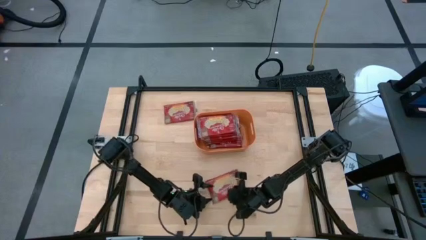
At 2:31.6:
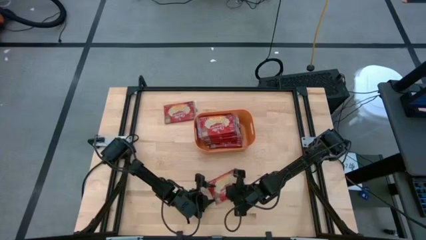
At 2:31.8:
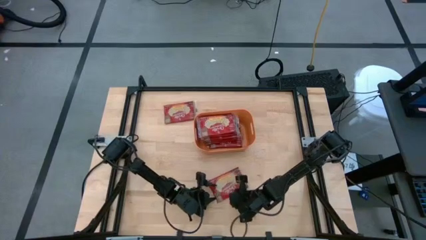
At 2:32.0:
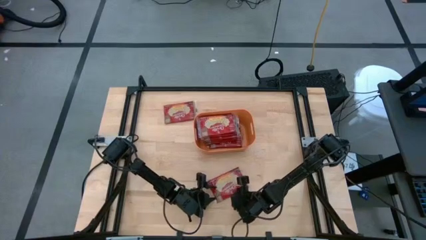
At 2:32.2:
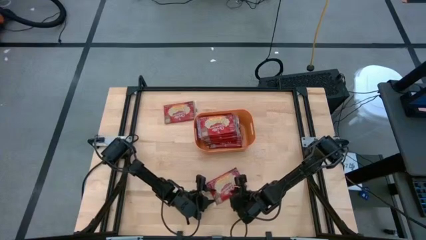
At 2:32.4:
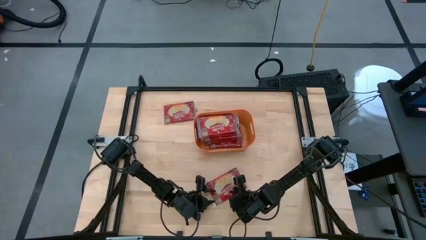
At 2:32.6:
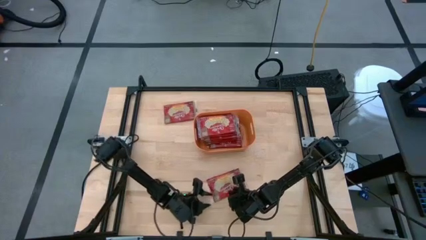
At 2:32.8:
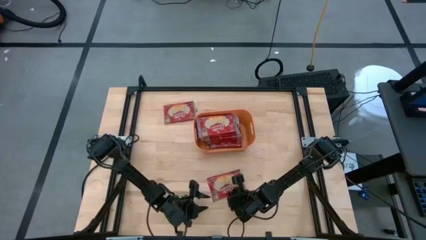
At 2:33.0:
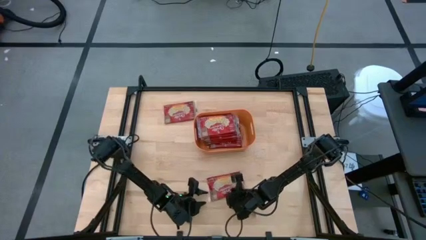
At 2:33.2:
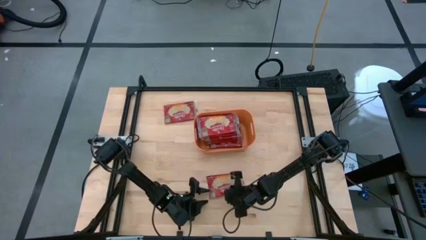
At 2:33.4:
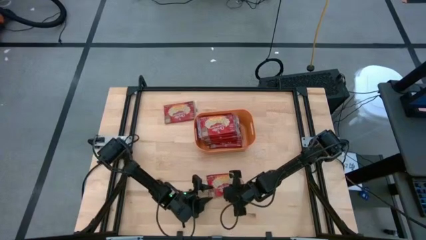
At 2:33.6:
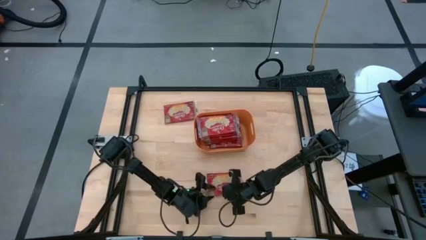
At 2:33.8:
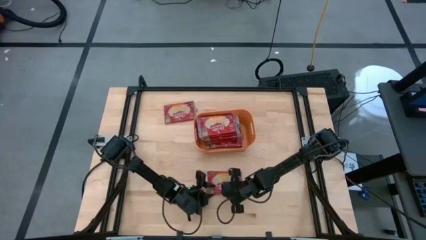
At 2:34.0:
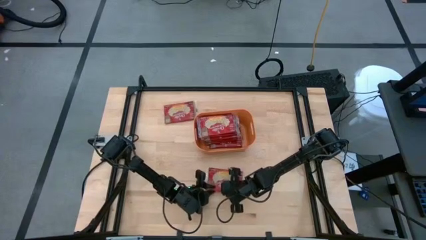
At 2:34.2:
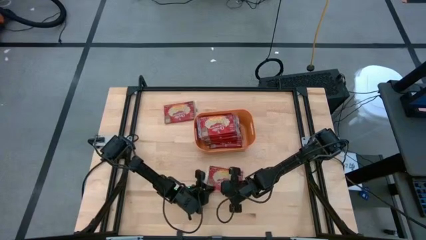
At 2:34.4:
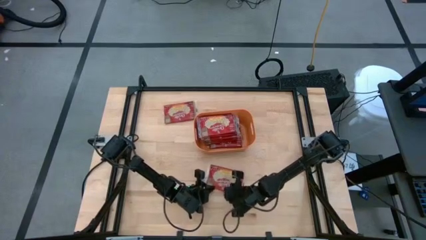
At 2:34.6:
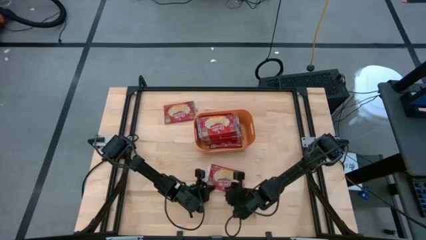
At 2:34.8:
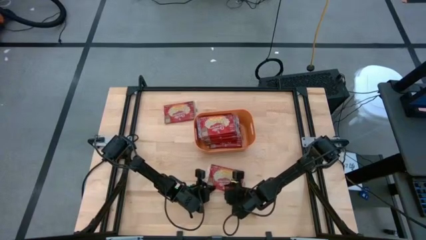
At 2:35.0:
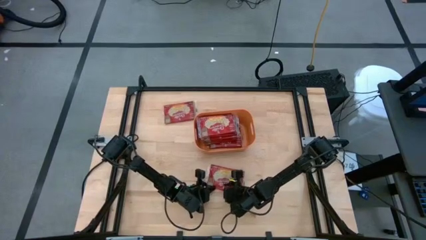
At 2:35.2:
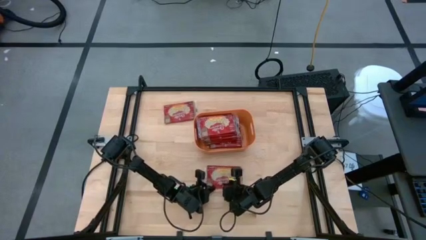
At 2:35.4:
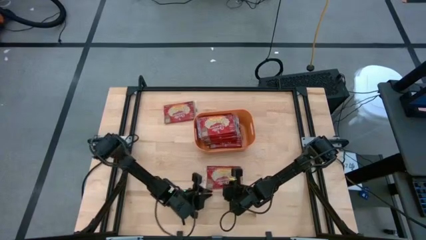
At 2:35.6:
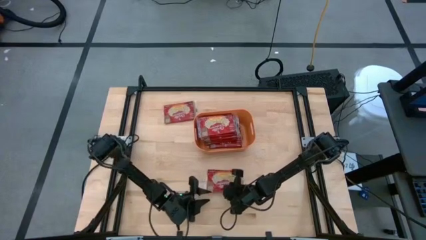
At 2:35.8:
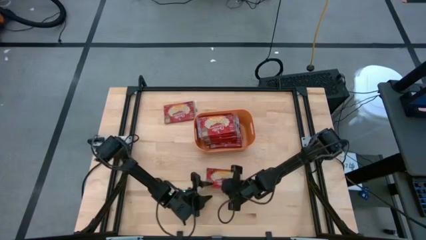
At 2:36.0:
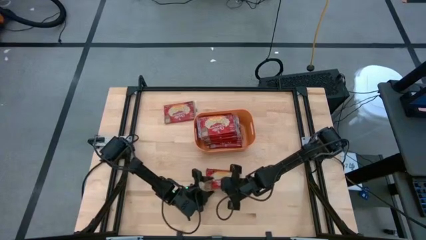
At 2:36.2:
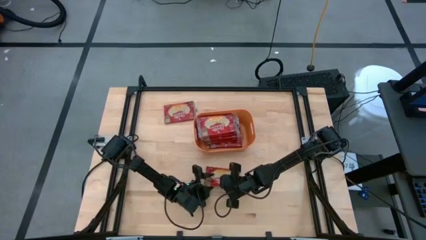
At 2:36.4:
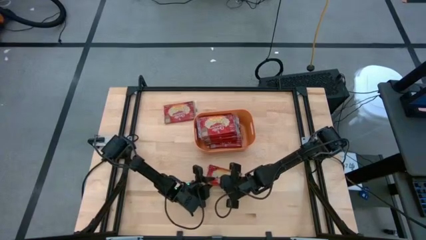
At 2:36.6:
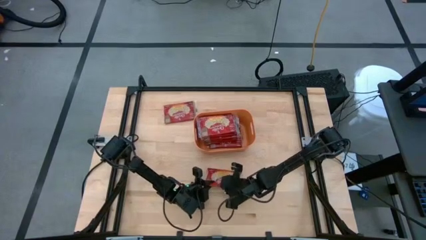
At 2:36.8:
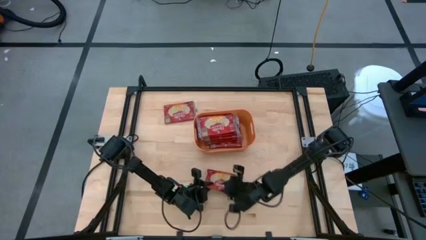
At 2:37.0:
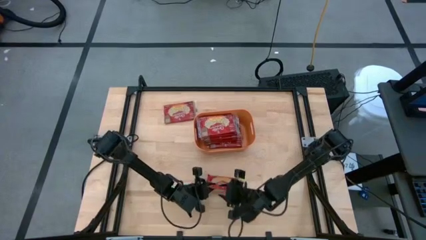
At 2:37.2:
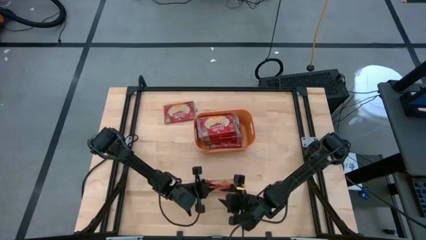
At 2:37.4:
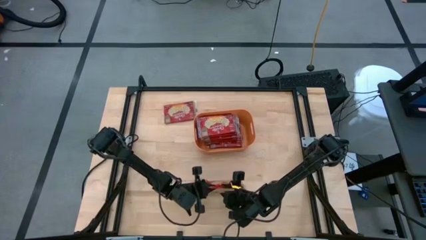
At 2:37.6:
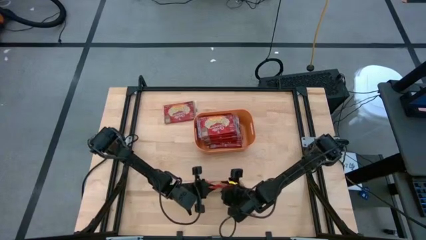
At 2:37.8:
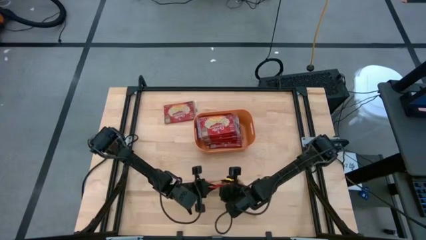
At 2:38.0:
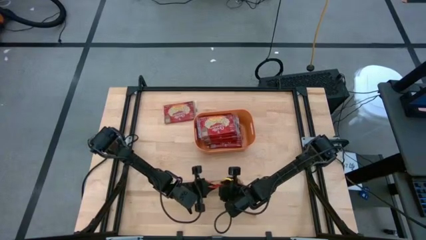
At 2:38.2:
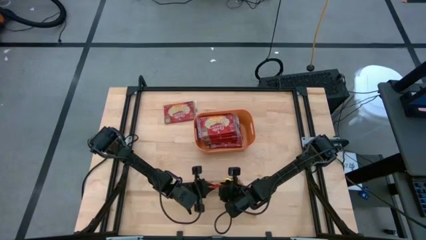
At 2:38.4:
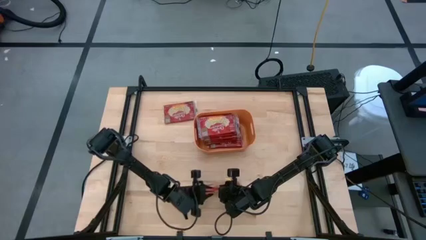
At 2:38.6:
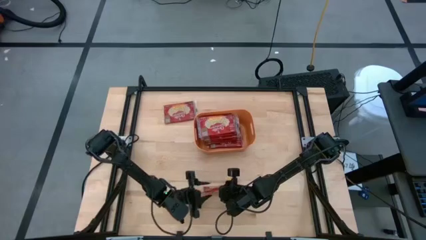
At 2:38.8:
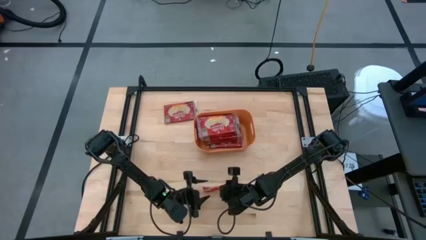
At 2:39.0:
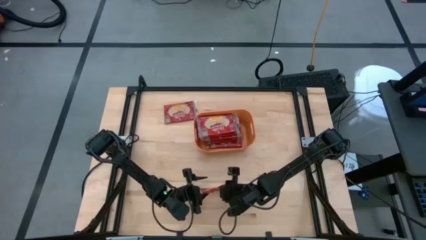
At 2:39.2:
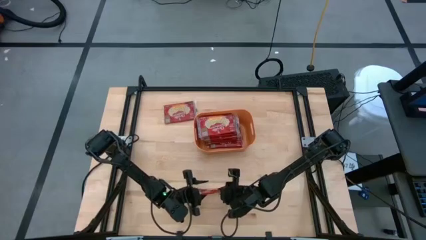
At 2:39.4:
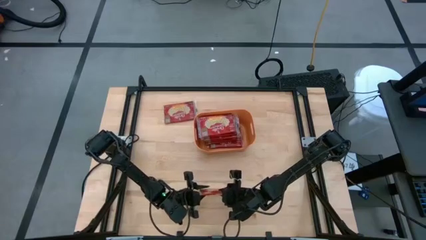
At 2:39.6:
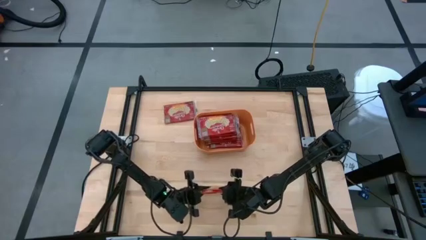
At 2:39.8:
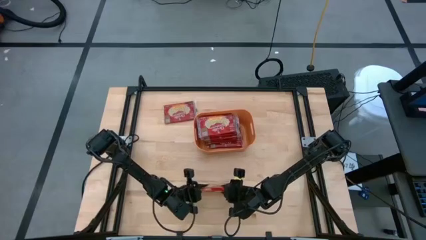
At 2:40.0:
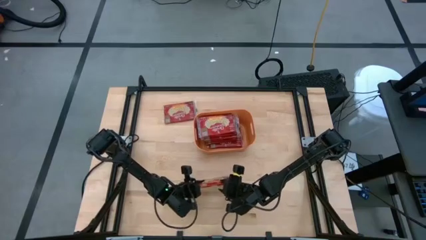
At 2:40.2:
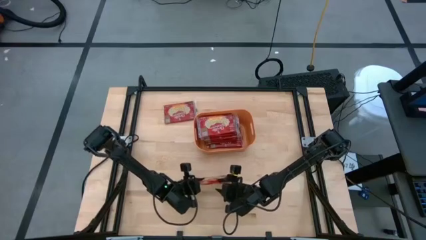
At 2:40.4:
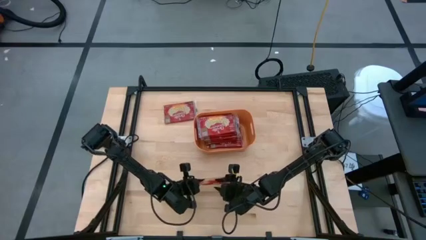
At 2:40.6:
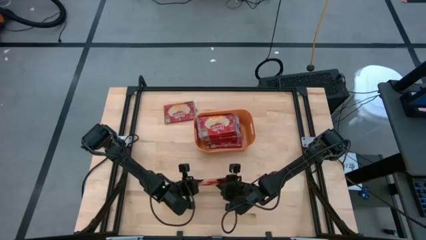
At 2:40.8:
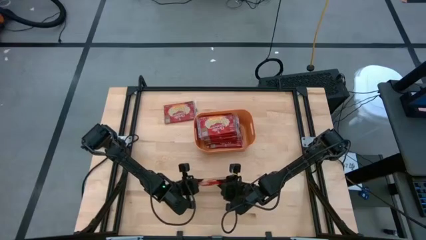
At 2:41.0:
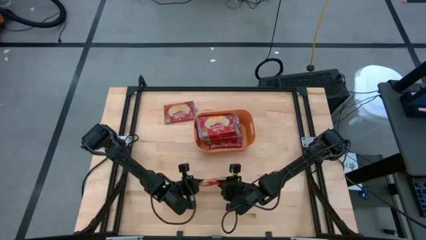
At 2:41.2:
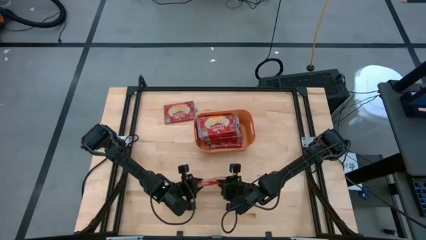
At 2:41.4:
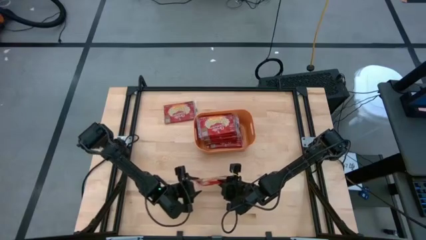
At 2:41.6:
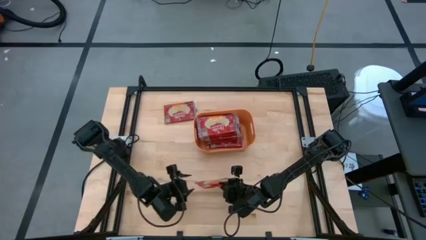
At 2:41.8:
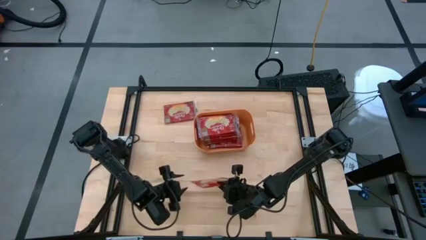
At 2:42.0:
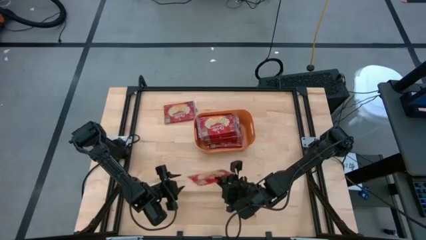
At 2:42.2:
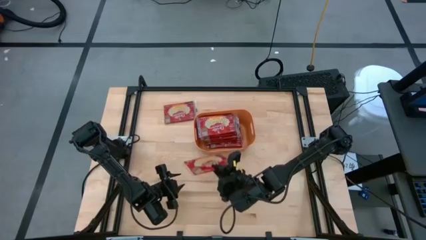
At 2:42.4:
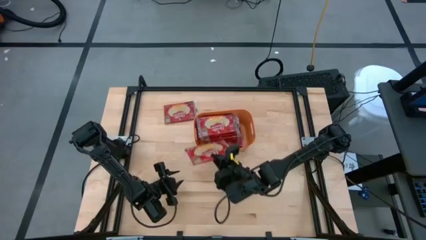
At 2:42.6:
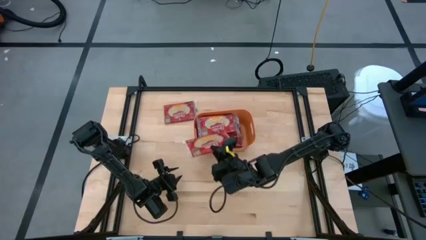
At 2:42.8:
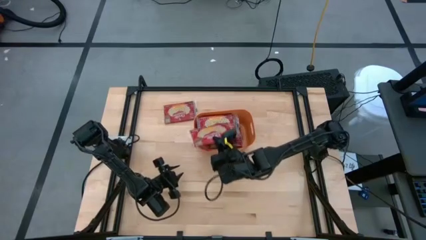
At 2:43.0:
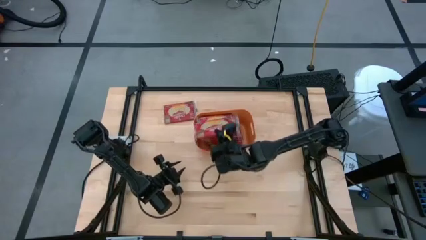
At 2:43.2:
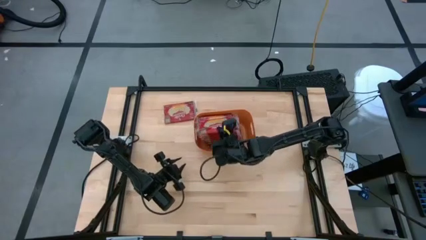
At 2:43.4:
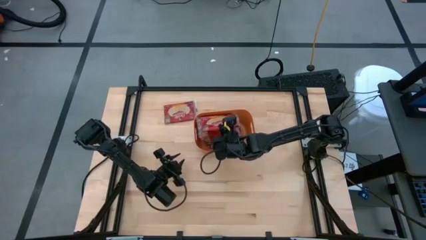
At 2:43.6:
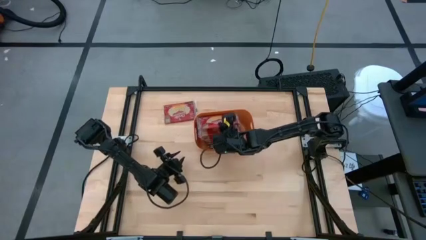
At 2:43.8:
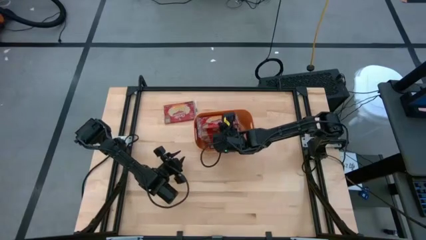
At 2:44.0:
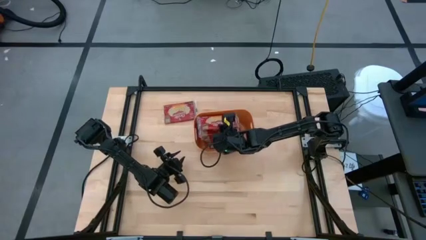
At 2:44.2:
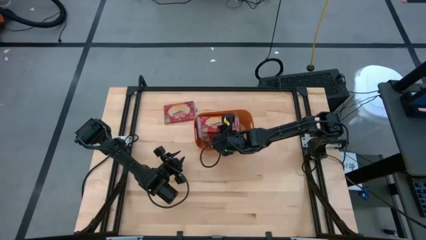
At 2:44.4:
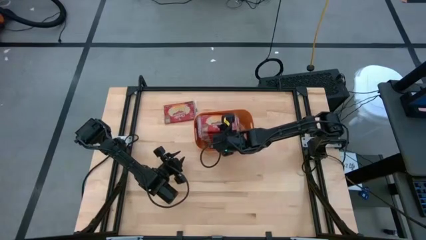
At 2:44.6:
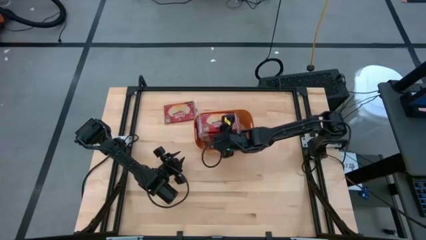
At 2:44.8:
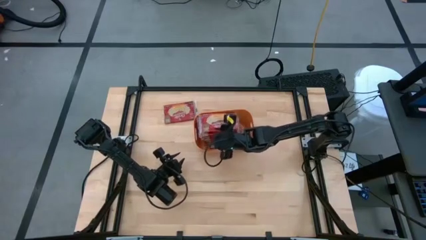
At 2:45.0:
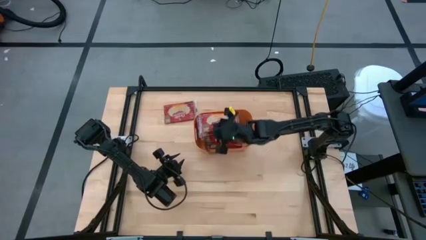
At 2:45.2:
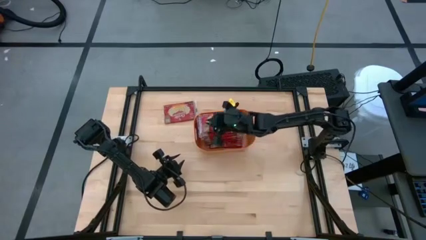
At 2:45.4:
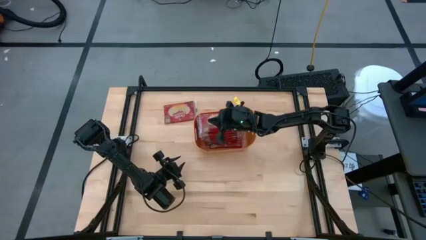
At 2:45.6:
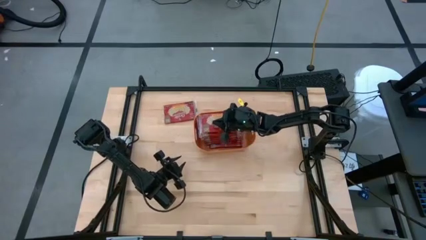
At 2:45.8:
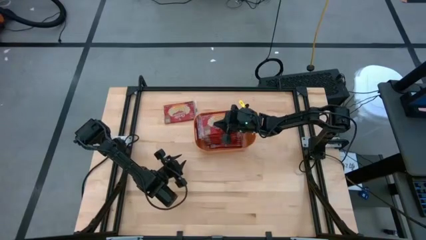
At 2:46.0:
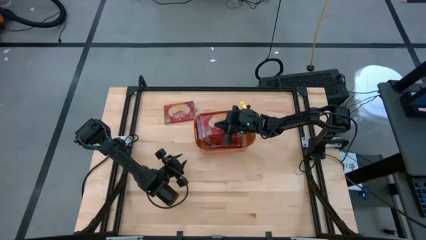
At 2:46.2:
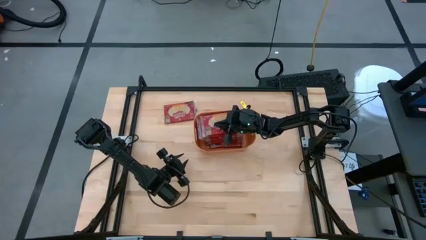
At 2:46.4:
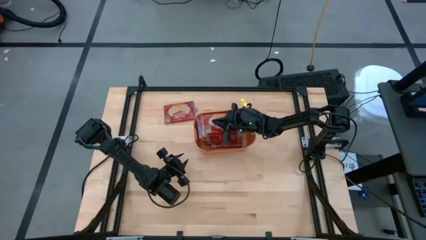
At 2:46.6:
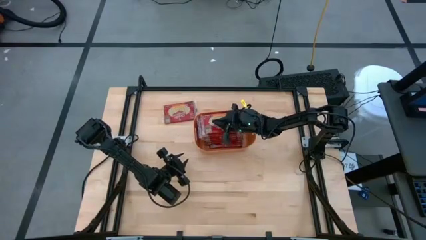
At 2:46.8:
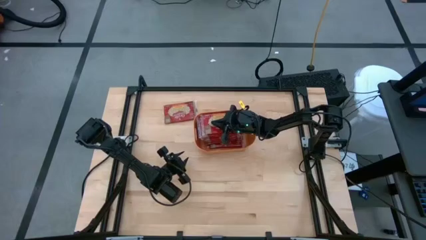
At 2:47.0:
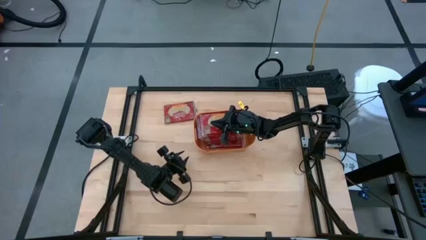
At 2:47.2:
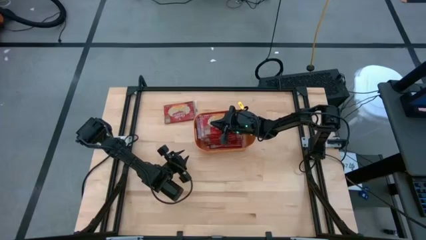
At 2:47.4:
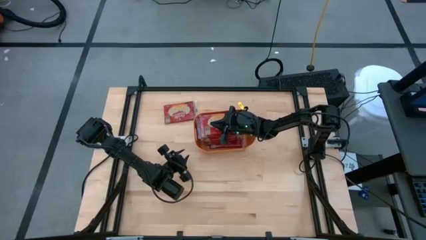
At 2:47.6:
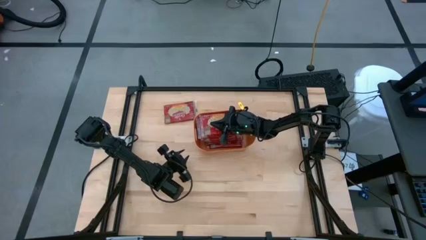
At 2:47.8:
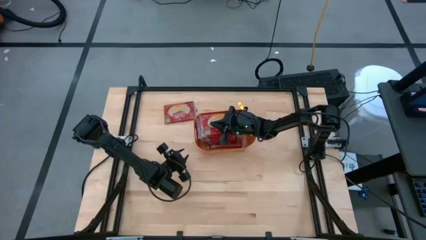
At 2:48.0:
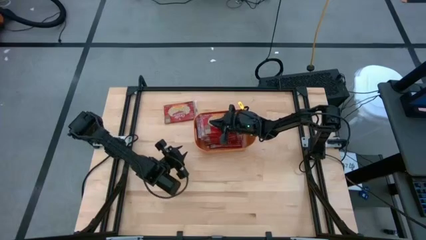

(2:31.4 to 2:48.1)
Task: Sort popcorn bags into baskets
Put the red popcorn bag into the orange bin
